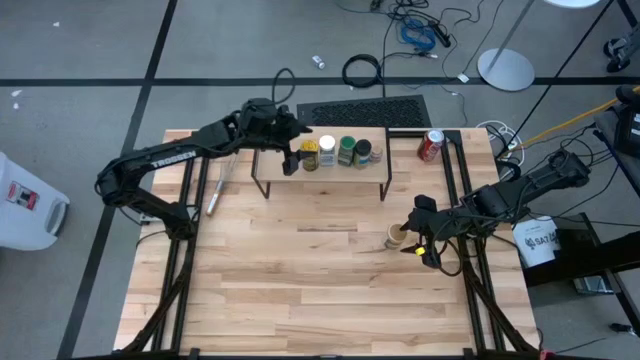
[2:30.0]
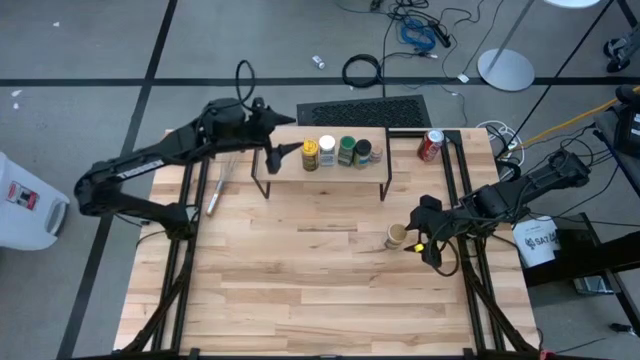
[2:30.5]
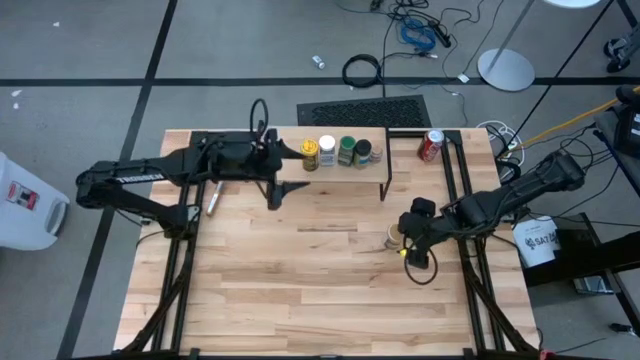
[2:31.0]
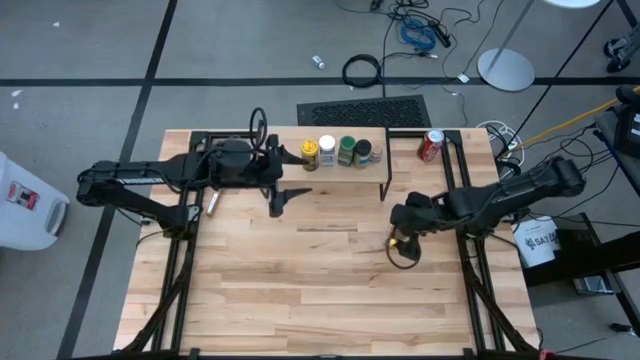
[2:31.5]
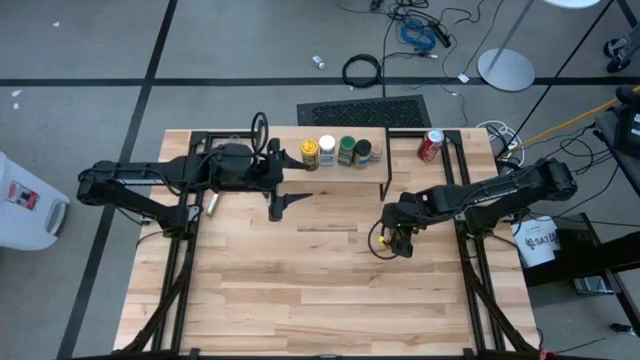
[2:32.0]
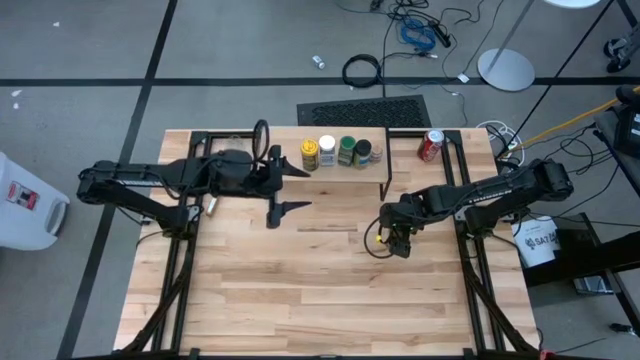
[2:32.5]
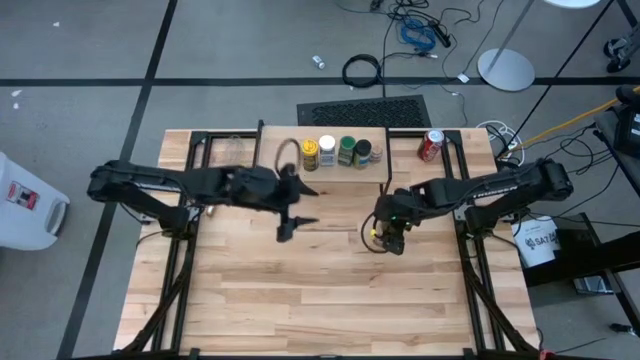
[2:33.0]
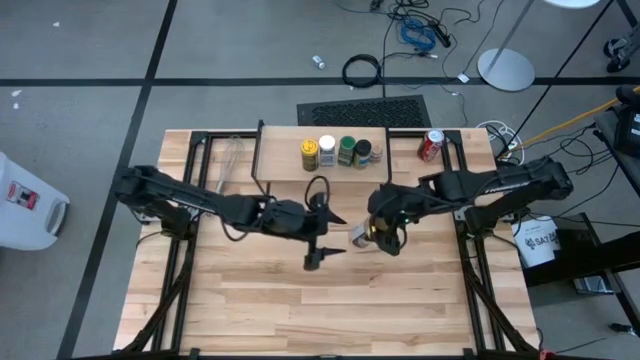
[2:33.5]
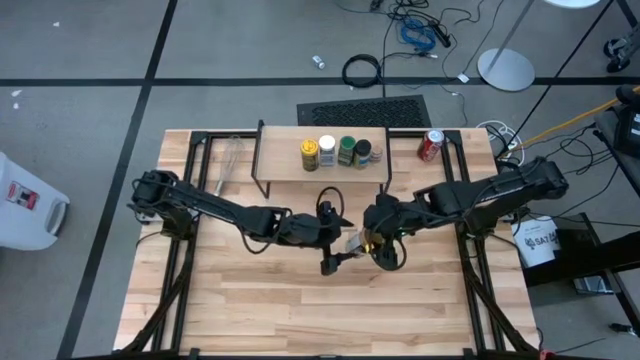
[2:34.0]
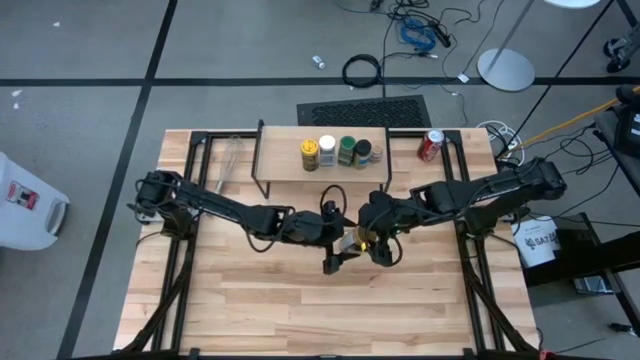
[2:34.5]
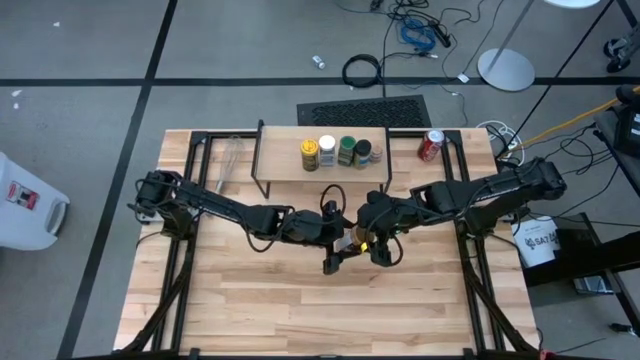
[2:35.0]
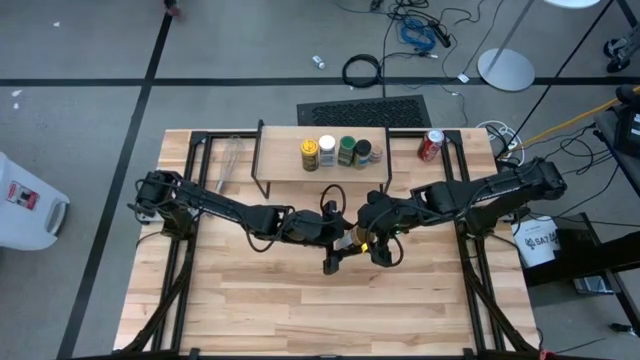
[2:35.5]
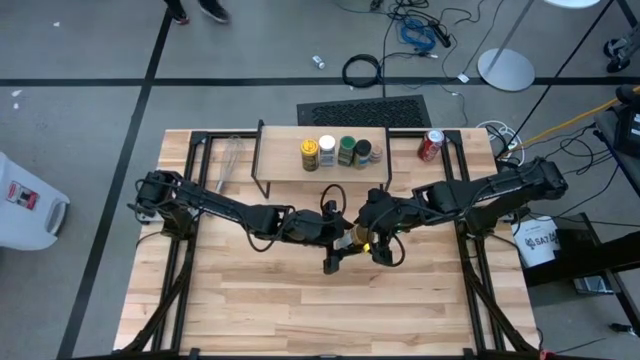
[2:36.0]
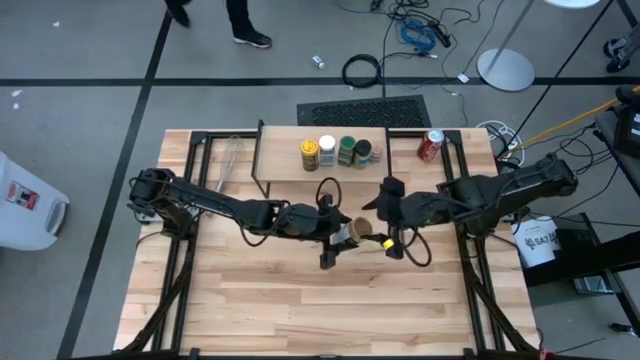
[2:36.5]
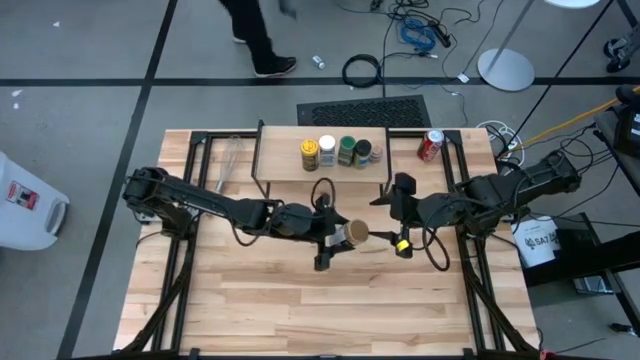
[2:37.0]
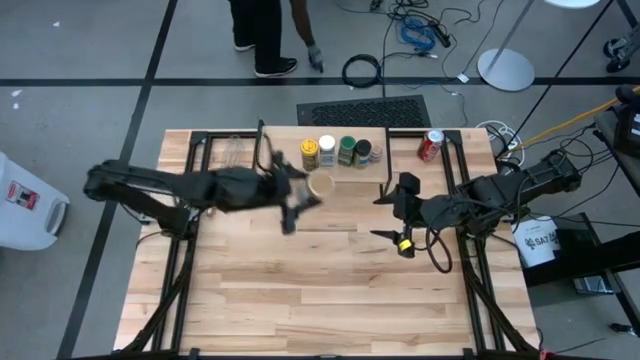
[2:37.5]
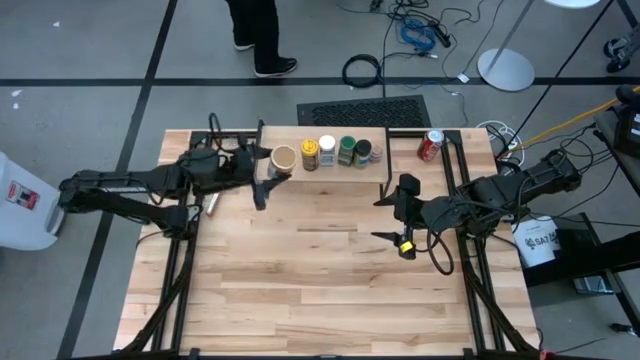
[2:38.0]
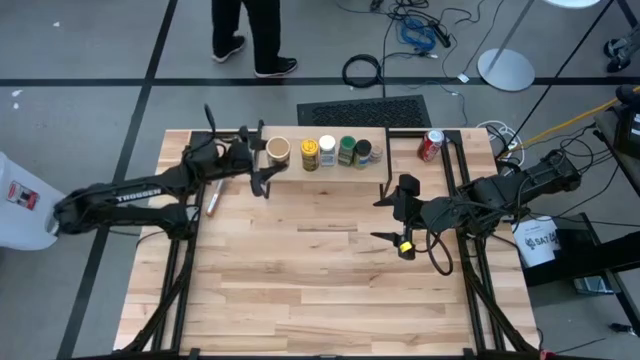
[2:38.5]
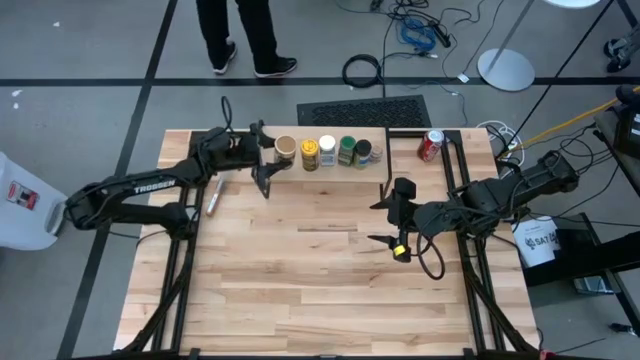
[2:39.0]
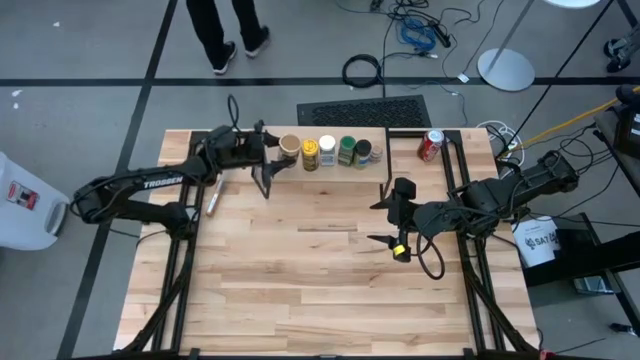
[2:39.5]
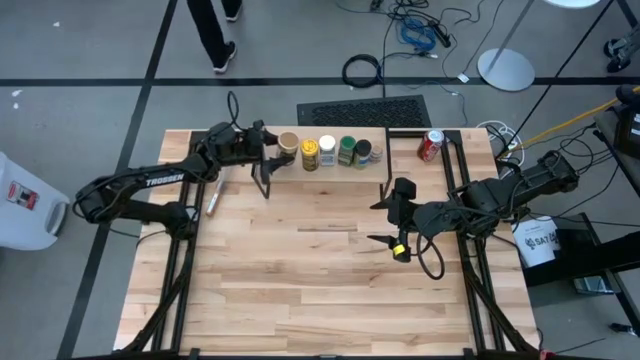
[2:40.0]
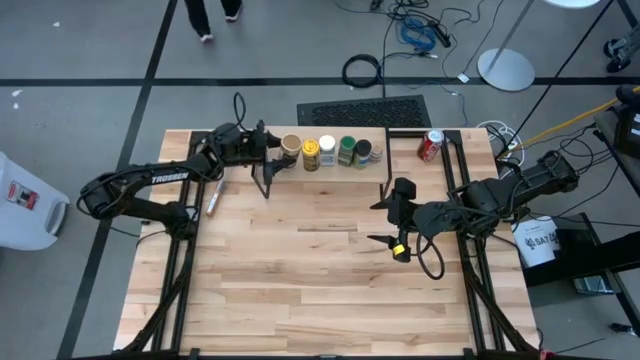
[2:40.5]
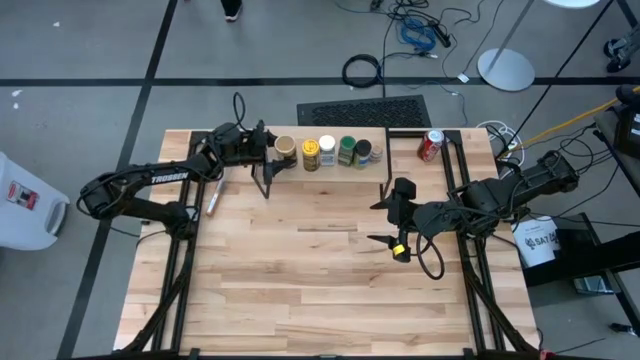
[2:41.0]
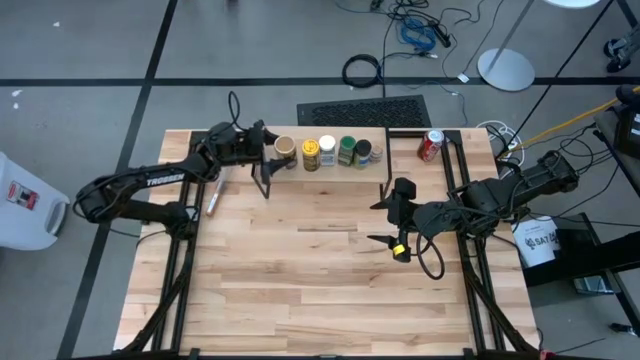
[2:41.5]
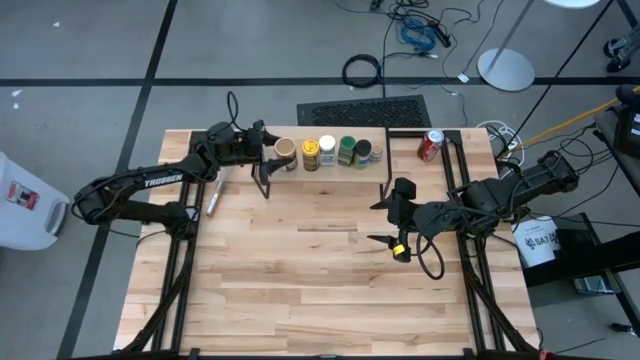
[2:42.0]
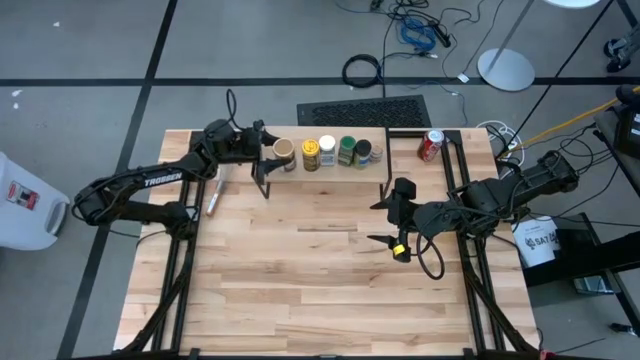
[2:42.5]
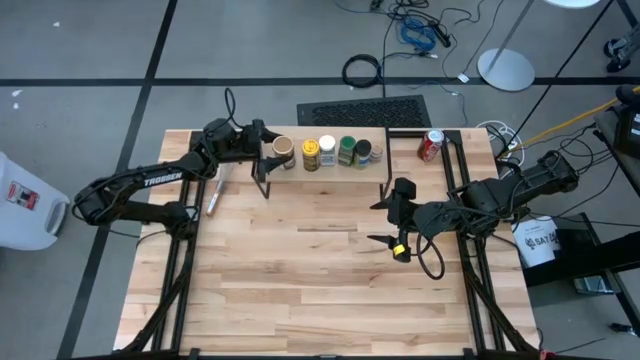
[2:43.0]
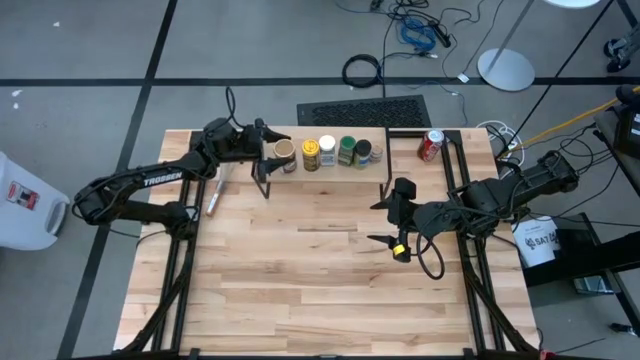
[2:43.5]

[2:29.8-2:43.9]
Task: Shelf spices
Put the golden seasoning bottle on the shelf

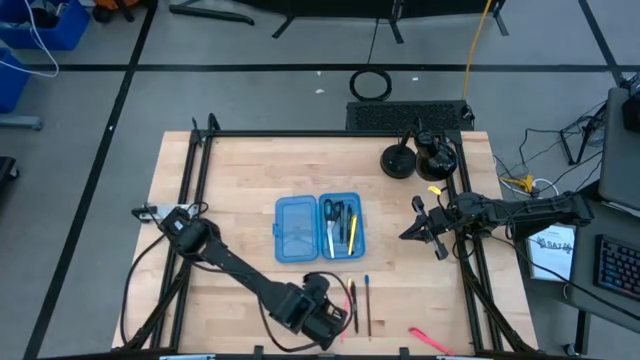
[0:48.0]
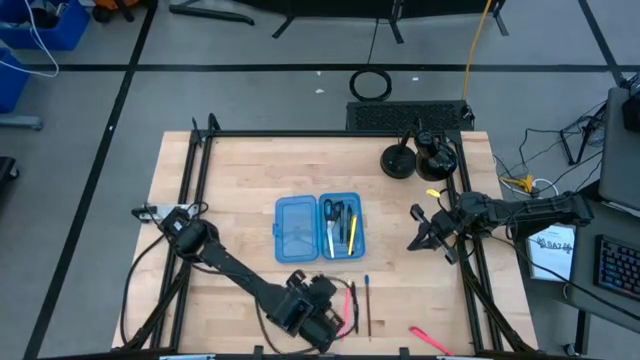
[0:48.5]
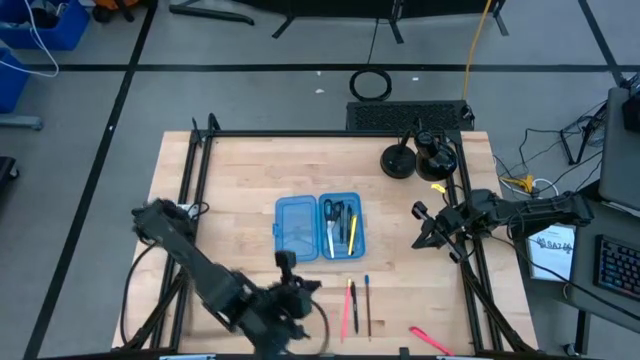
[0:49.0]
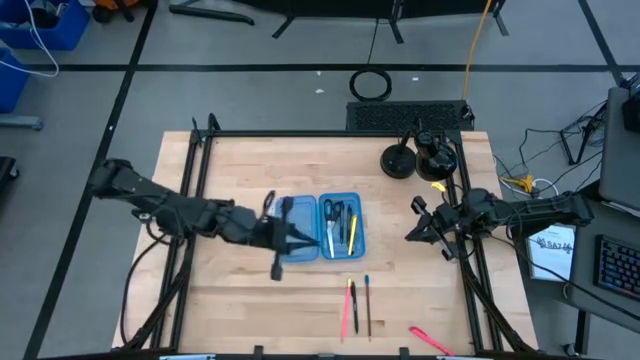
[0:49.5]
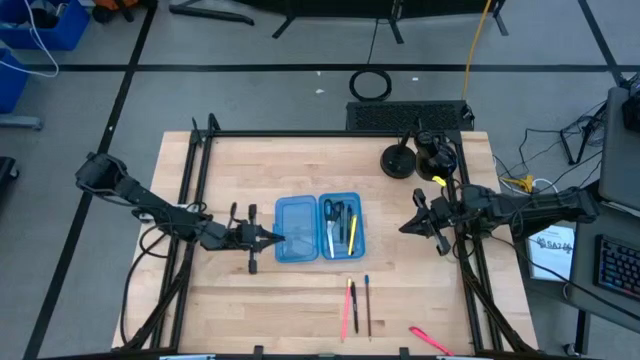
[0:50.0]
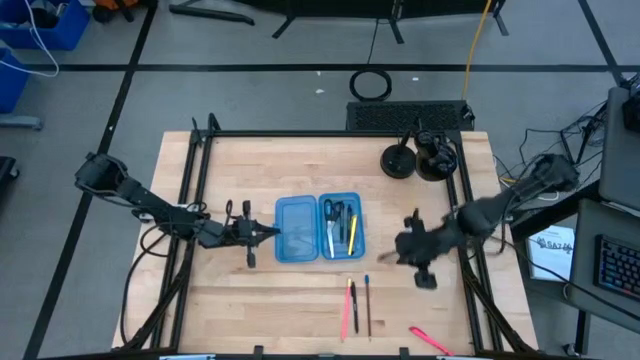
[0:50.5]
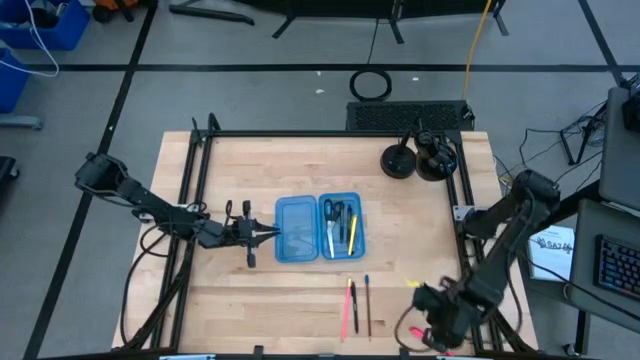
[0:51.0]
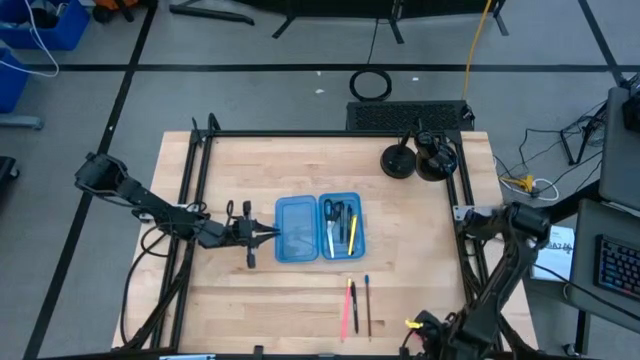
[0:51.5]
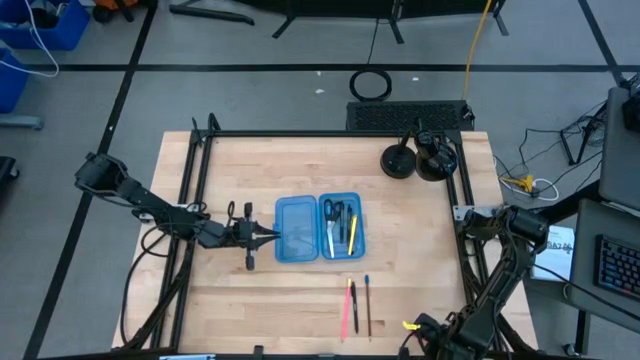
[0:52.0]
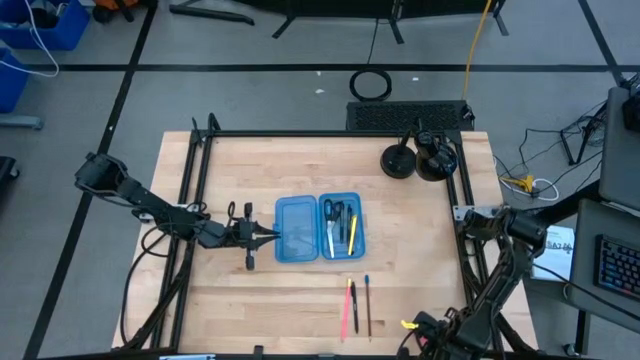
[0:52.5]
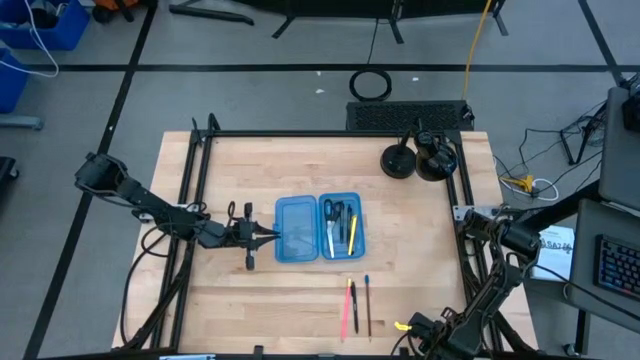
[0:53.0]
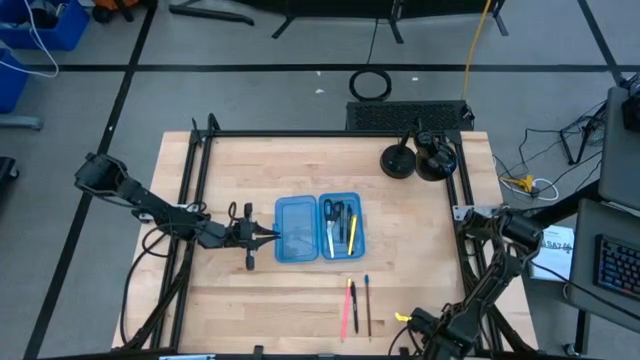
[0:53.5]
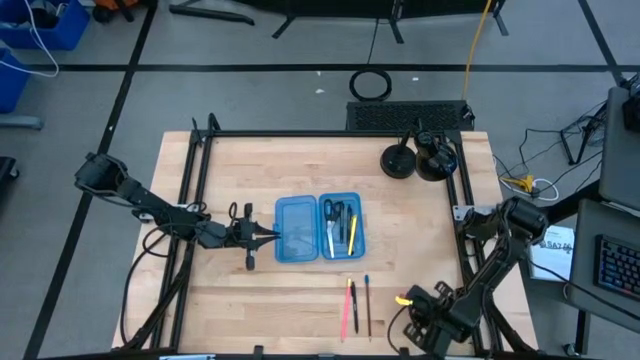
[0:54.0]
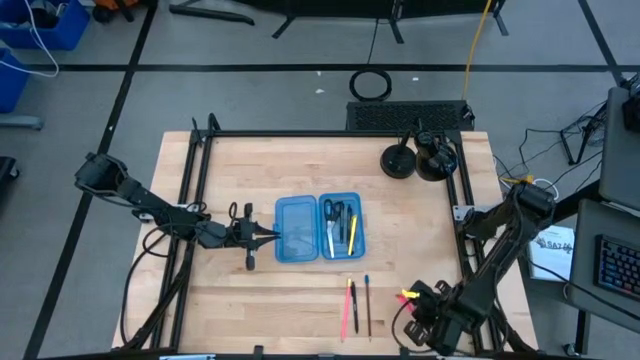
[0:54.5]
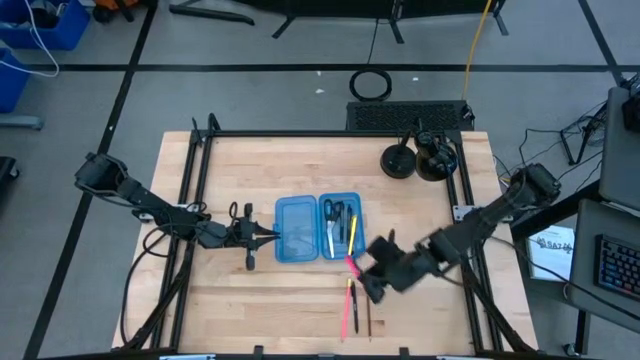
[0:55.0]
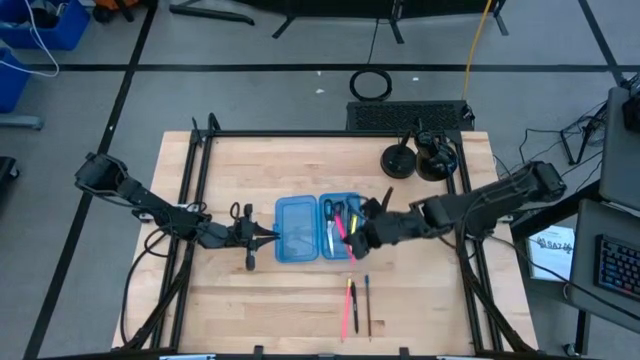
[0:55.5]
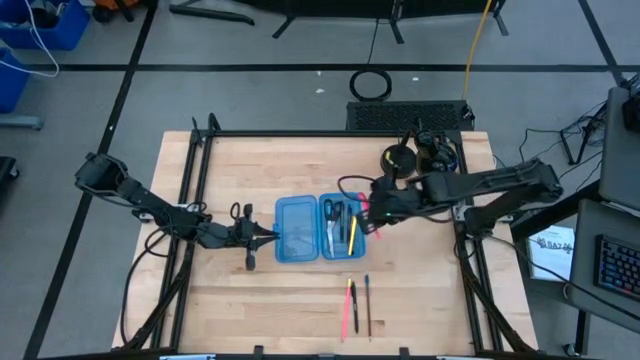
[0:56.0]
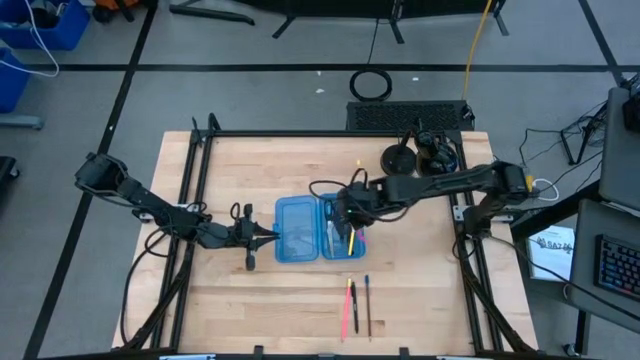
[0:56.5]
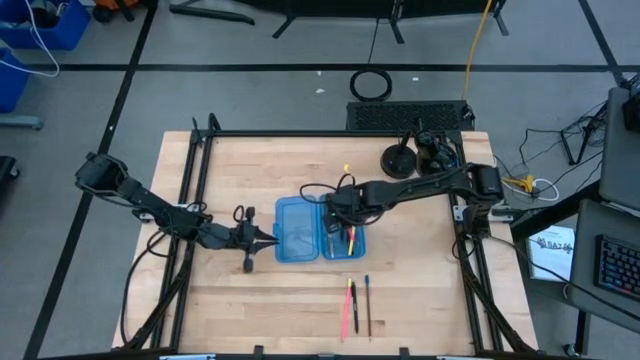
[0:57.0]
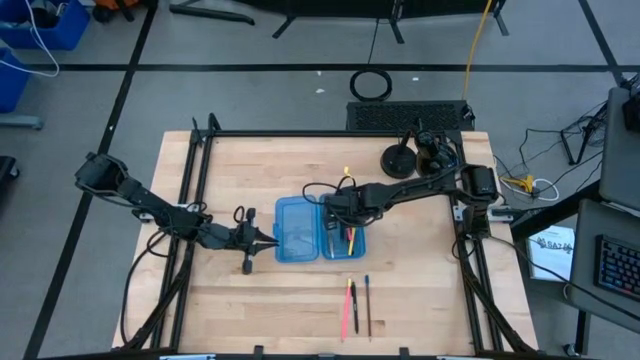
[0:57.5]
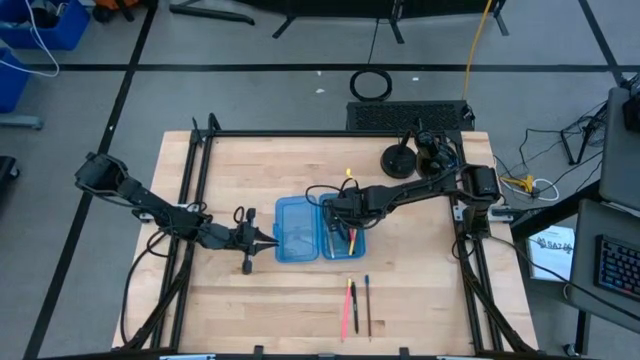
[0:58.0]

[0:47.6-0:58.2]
Task: Pick & place school supplies into a supply box
Put the pink pen into the blue supply box
